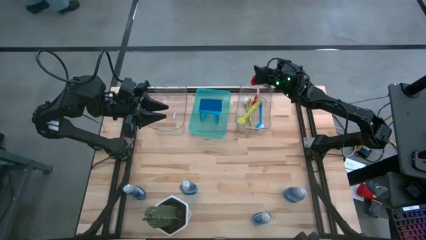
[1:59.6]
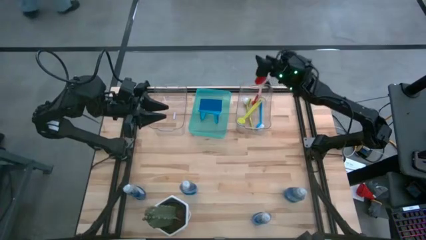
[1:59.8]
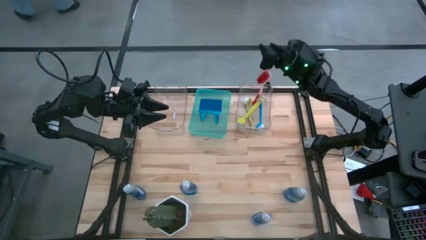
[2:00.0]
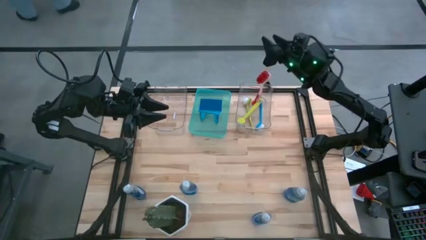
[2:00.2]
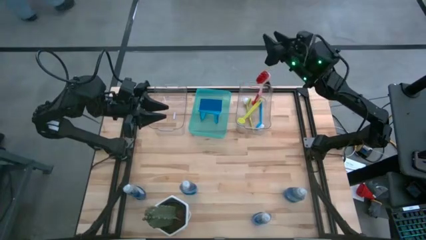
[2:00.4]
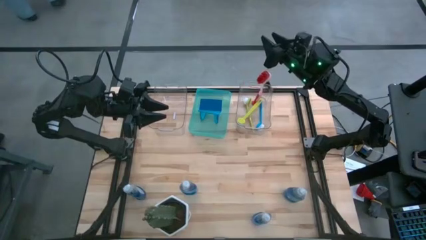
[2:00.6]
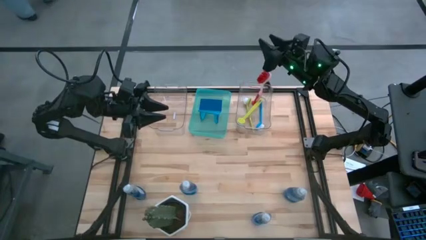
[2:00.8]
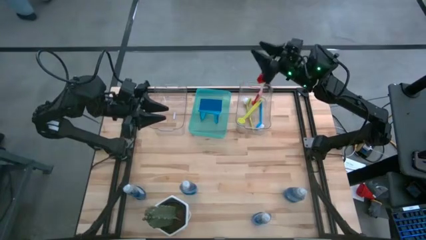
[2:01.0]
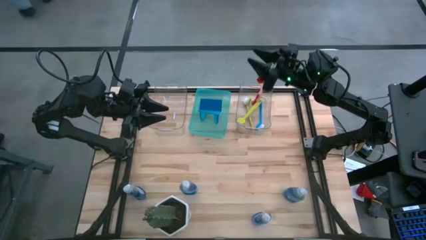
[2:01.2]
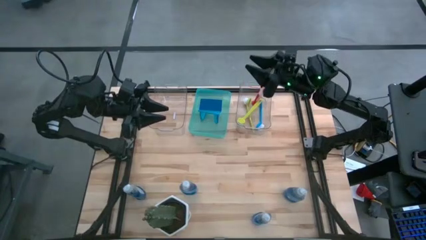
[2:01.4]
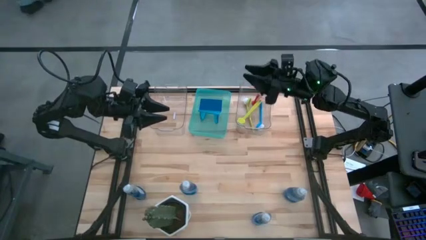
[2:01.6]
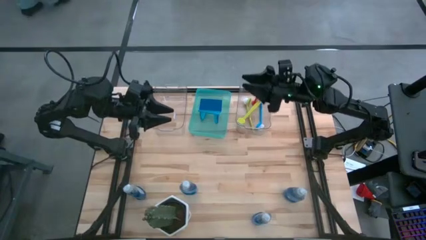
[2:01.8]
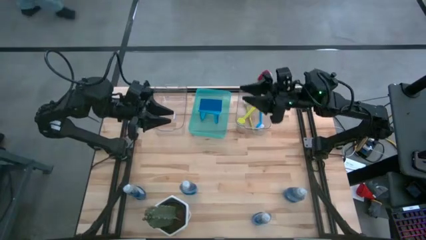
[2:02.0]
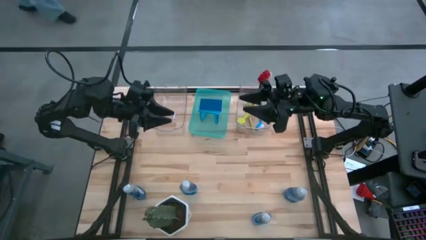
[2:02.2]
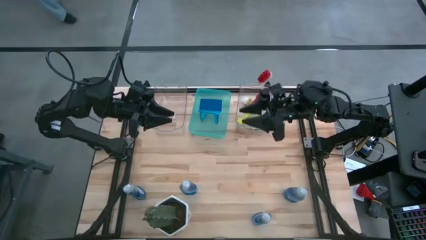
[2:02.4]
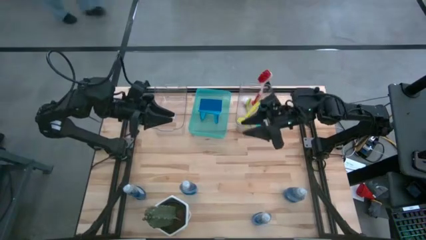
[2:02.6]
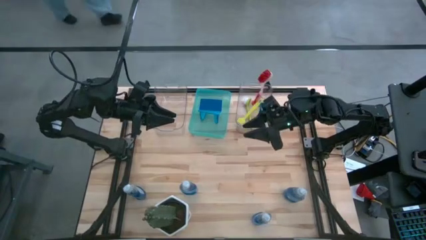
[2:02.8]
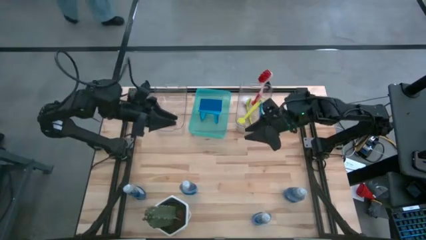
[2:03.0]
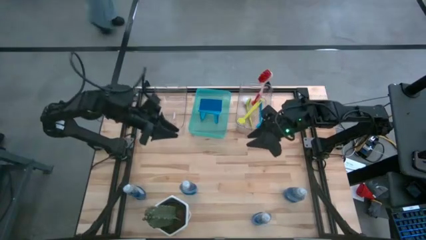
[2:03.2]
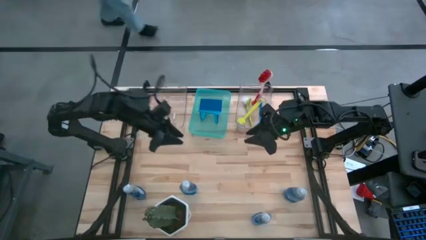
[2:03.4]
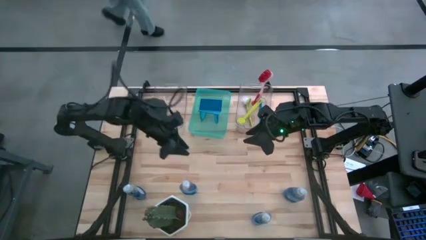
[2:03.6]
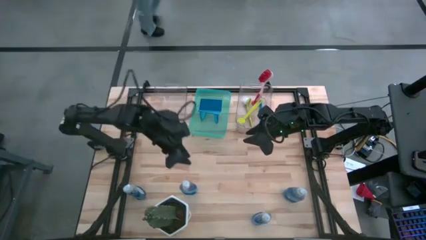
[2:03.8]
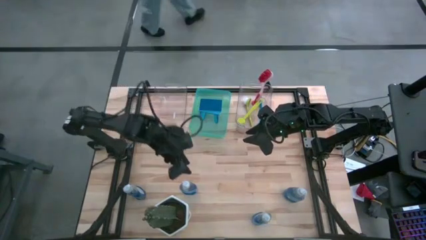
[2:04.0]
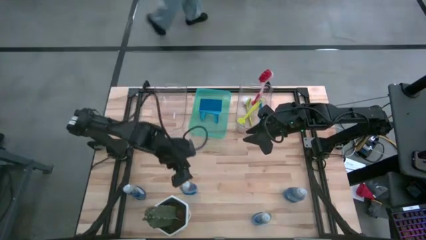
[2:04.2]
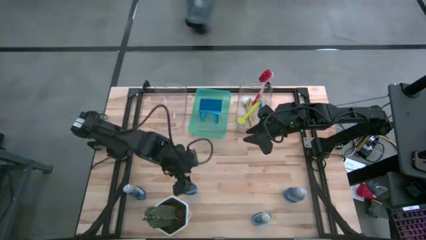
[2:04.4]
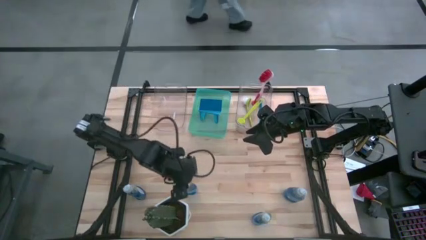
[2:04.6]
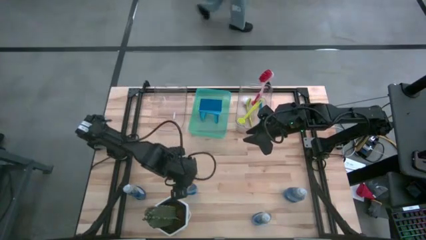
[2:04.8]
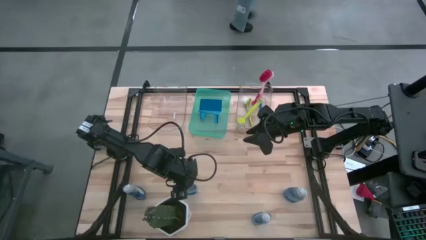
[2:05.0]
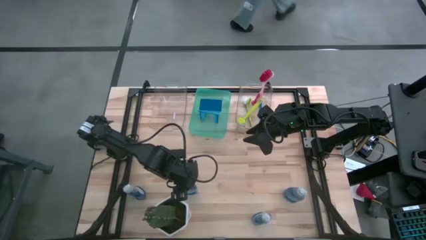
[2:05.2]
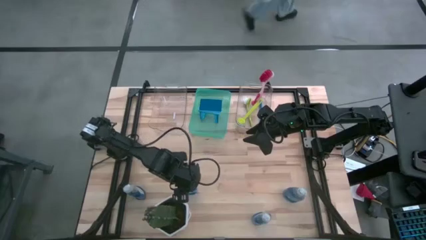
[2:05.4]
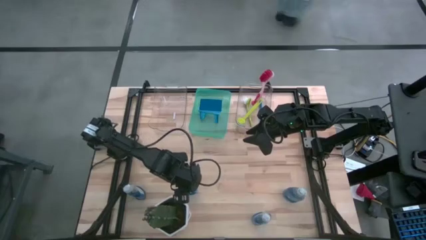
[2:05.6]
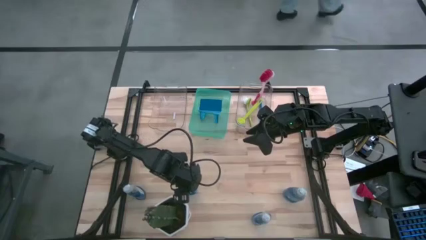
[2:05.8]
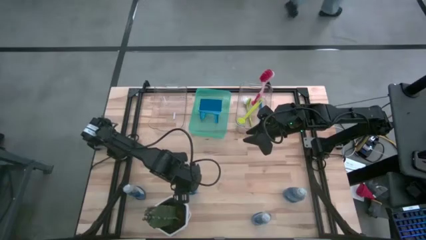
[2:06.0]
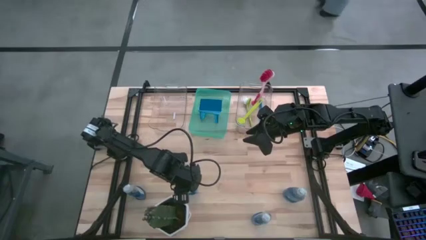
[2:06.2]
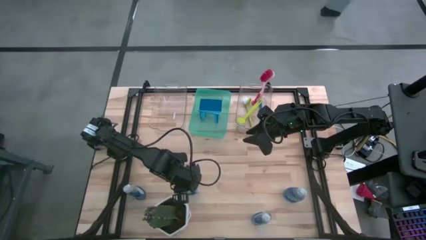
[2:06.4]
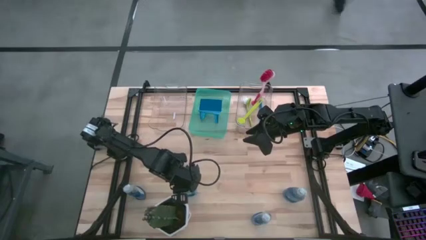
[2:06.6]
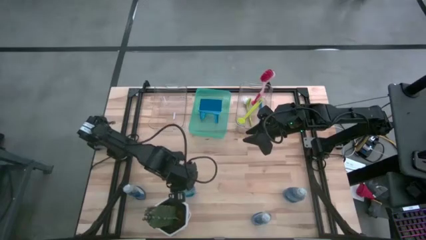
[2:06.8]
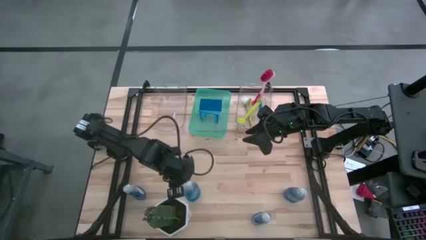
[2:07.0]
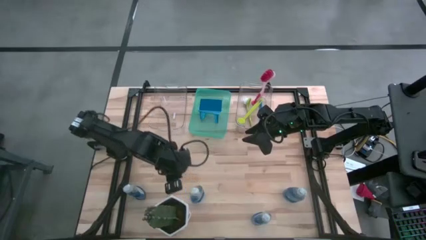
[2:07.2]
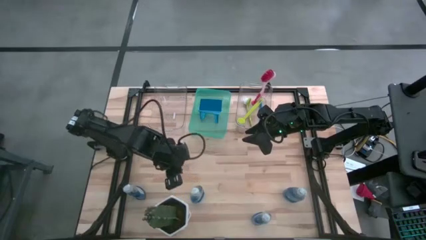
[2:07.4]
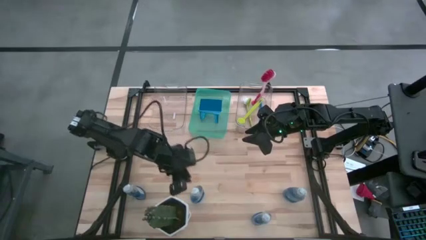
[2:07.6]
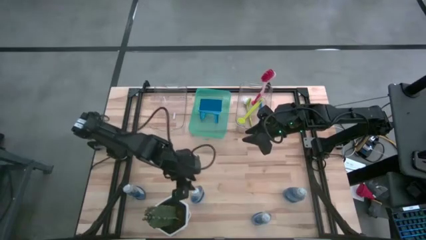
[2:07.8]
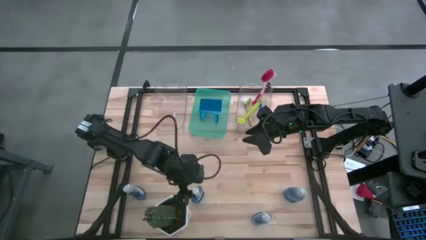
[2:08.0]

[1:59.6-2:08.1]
Task: Pick & Place Kitchen Sink Supplies
Put the dishwashing liquid into the left transparent bin

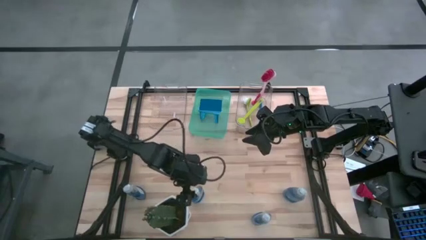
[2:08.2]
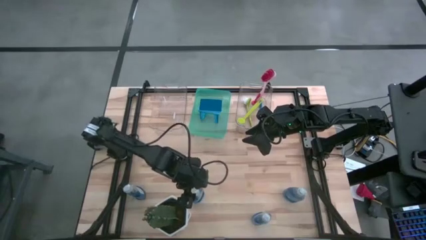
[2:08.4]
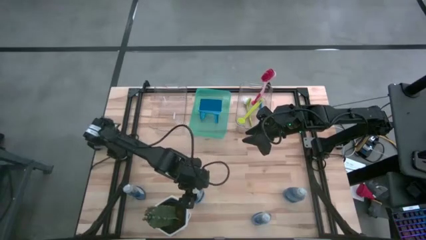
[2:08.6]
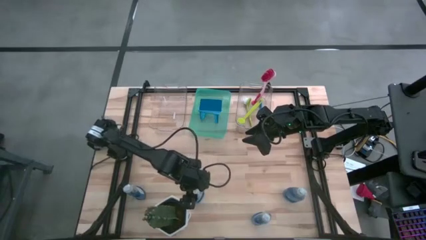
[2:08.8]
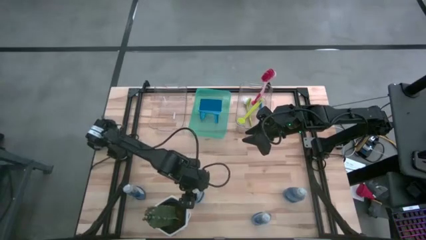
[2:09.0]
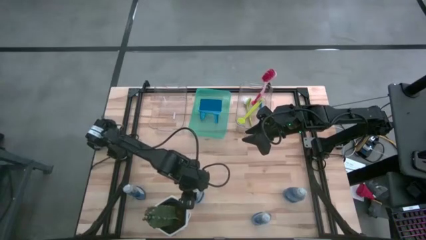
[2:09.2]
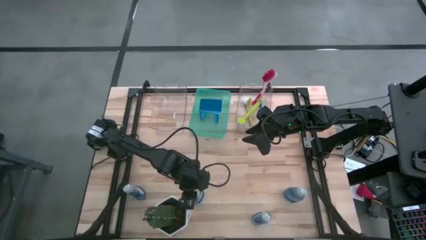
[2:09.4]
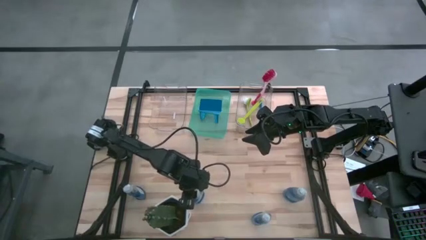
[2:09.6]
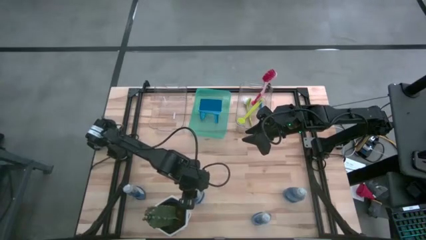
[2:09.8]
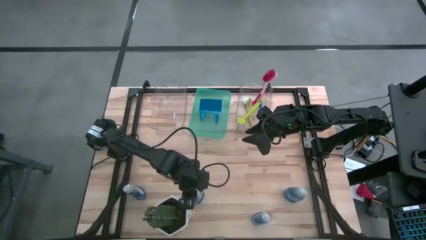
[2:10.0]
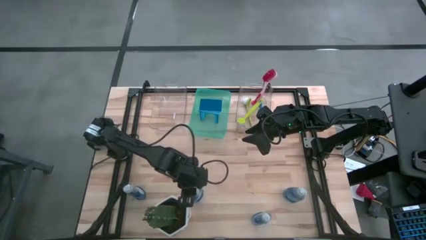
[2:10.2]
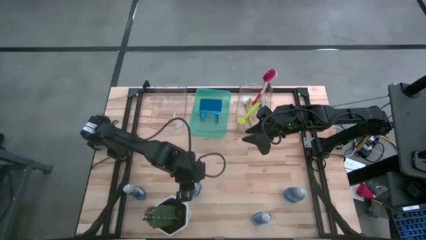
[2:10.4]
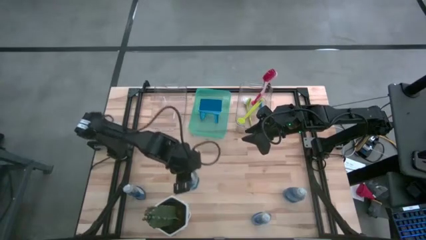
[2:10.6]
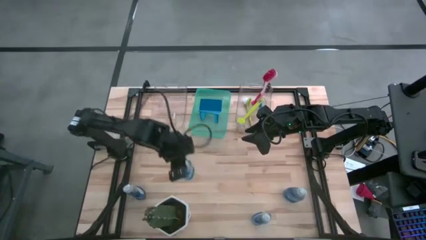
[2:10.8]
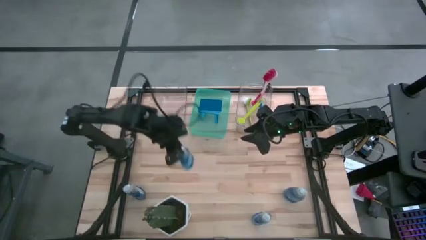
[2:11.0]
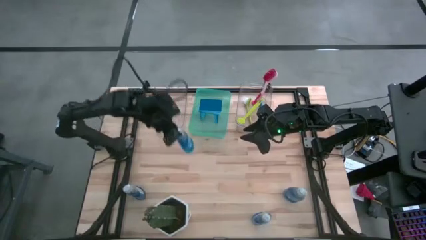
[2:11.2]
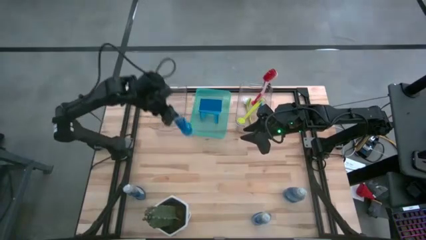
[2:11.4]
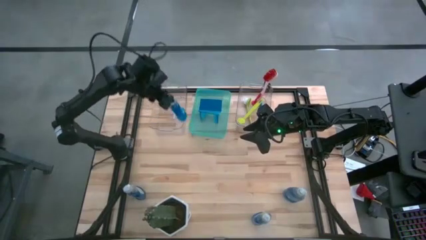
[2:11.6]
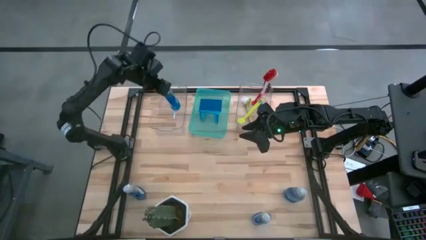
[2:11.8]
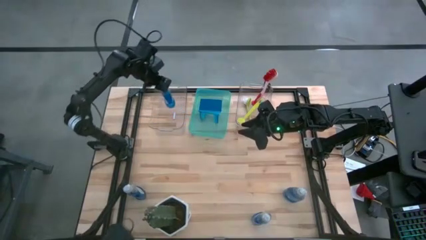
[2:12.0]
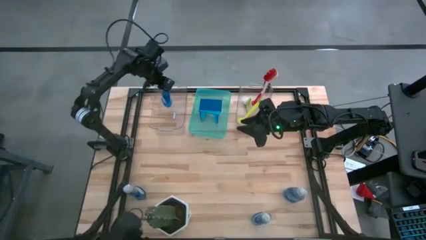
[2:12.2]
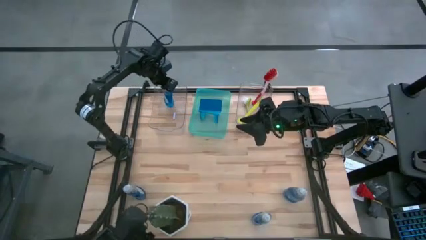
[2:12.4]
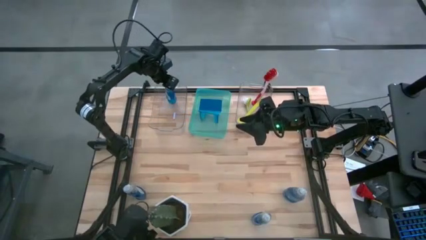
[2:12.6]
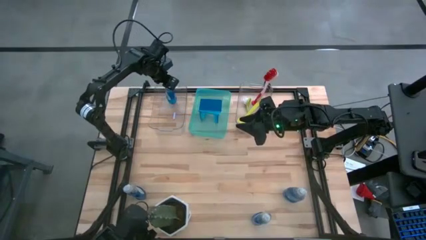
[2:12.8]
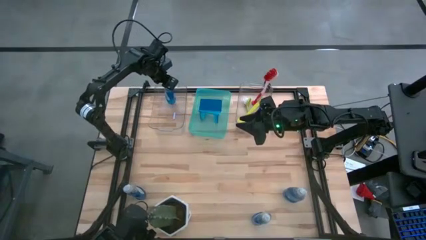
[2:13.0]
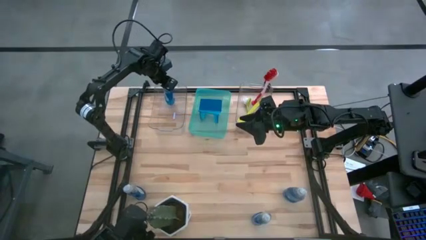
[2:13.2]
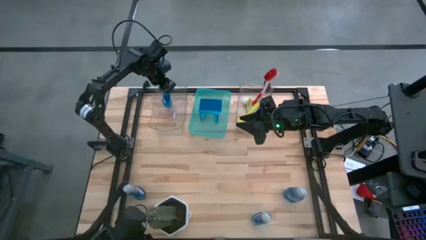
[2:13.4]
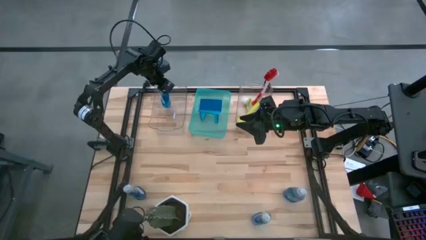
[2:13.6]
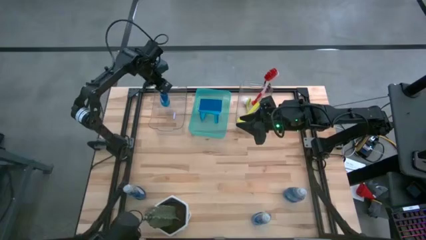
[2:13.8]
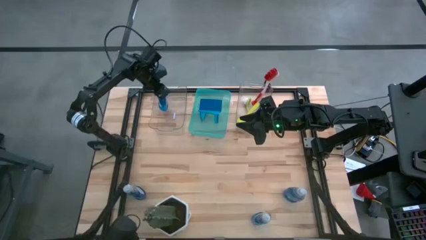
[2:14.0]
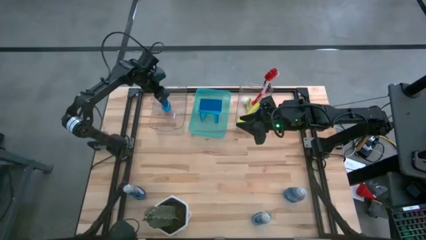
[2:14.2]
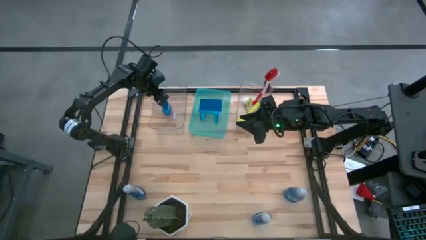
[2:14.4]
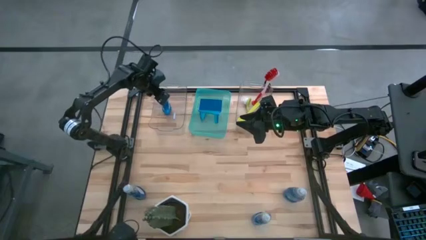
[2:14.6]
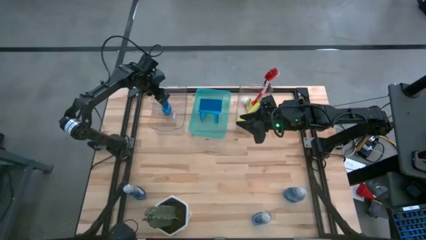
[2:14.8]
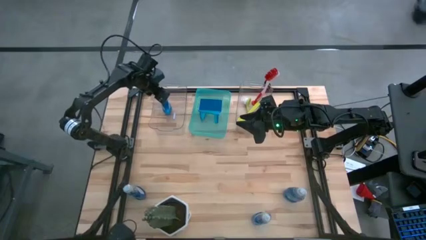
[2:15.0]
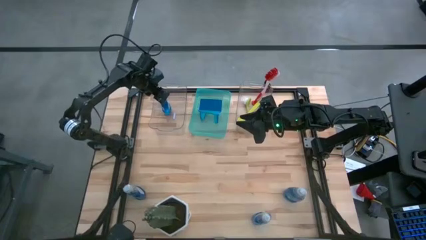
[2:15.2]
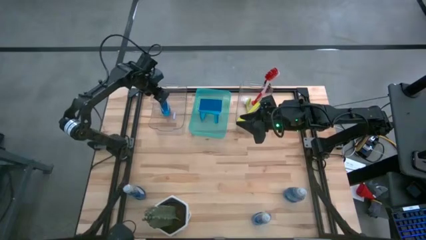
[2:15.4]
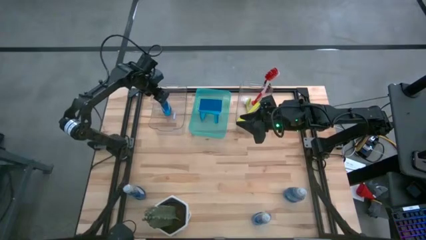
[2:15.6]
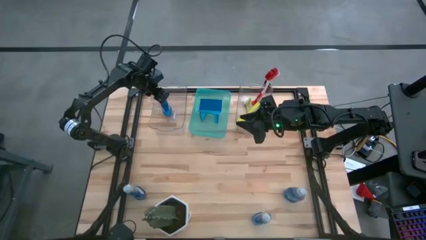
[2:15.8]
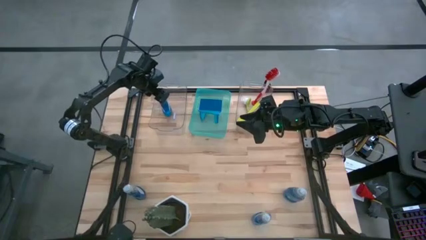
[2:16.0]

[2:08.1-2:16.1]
Put the dishwashing liquid into the left transparent bin
